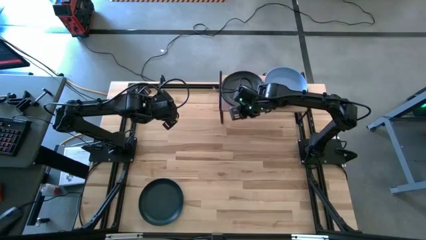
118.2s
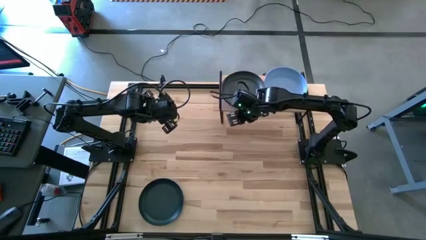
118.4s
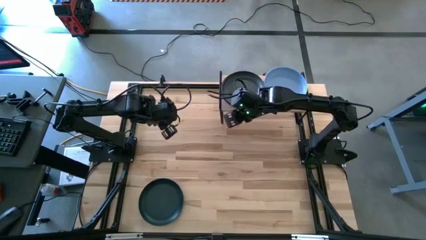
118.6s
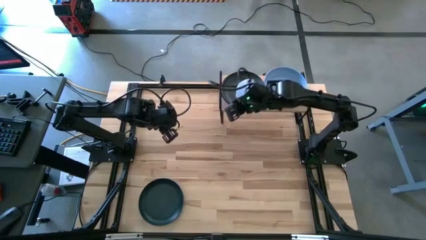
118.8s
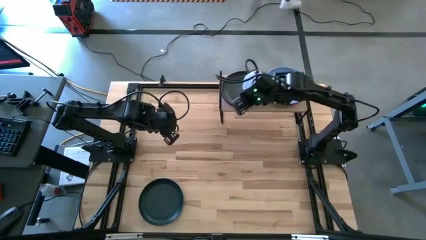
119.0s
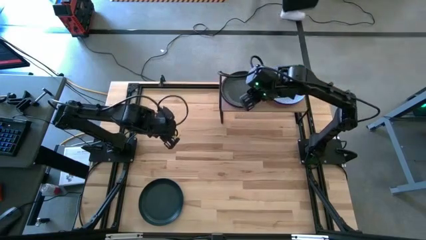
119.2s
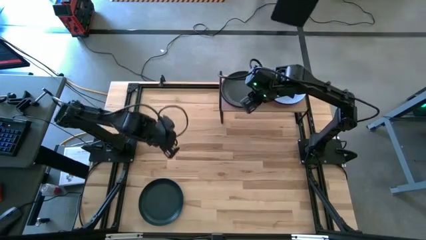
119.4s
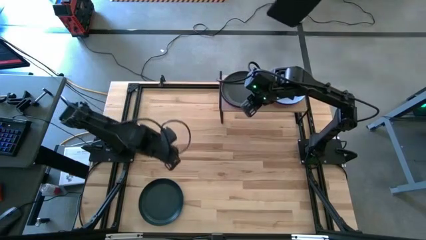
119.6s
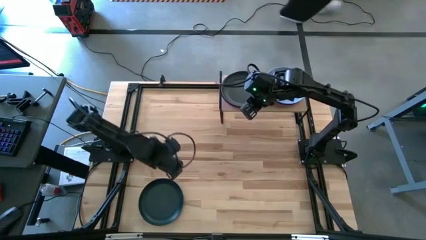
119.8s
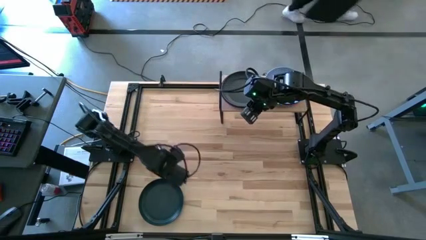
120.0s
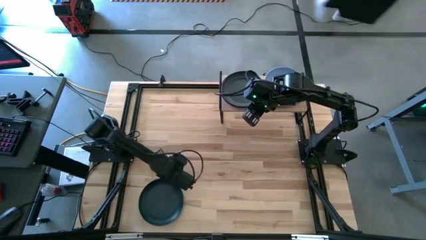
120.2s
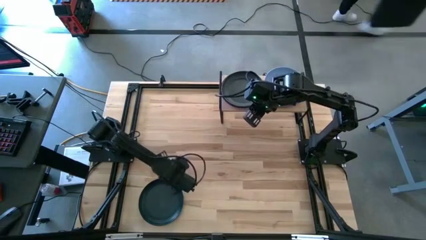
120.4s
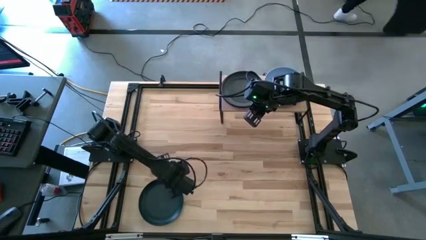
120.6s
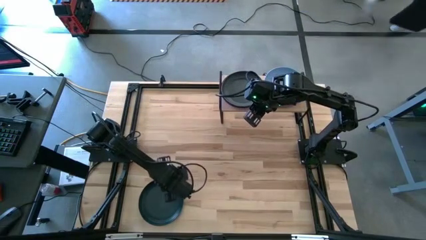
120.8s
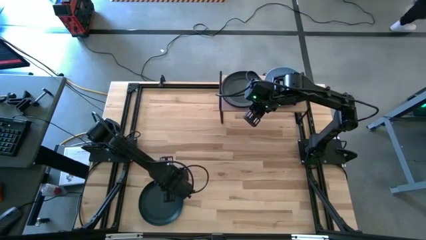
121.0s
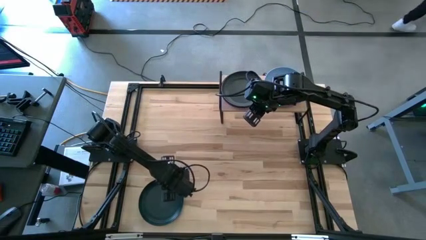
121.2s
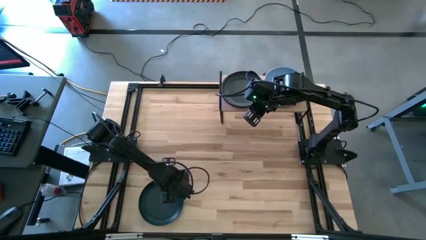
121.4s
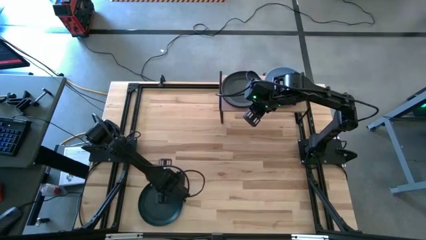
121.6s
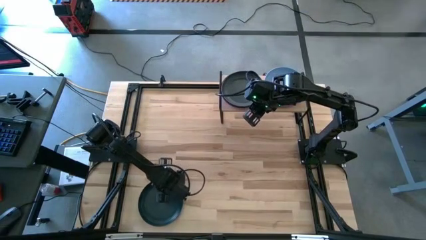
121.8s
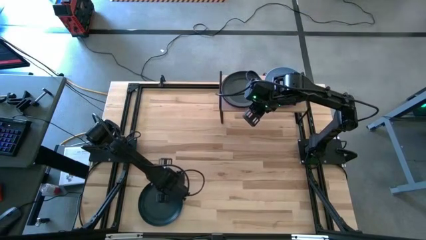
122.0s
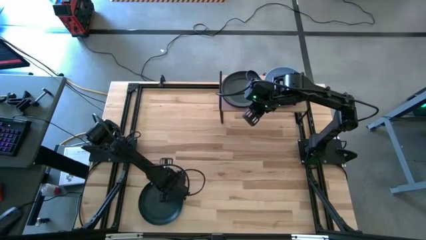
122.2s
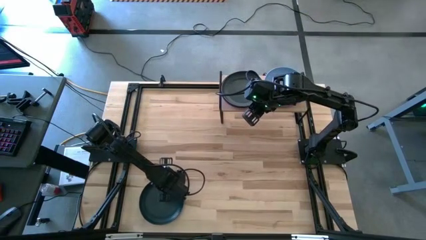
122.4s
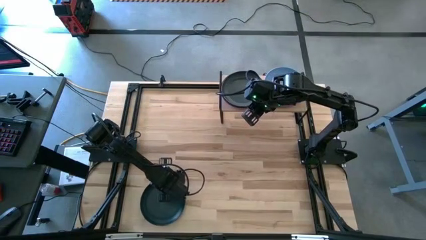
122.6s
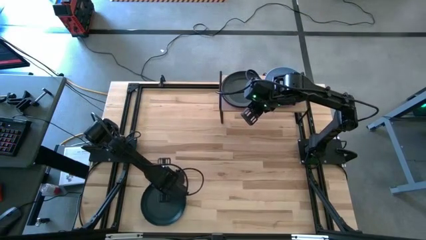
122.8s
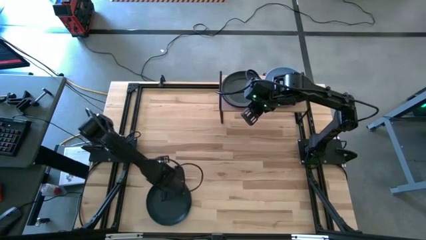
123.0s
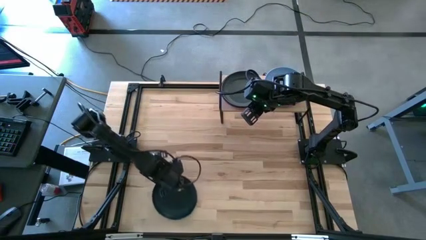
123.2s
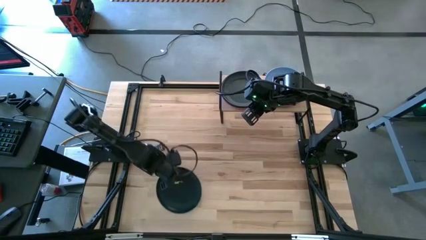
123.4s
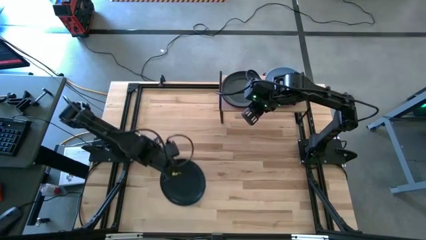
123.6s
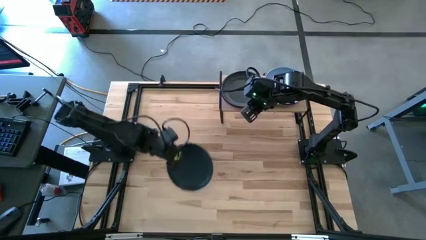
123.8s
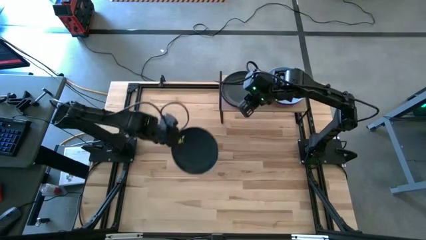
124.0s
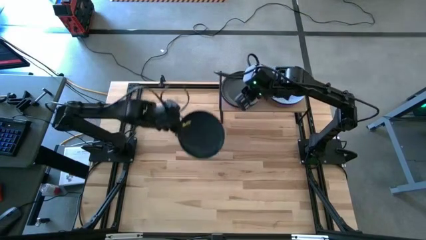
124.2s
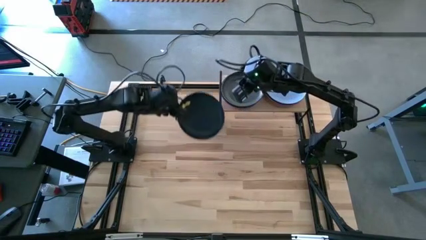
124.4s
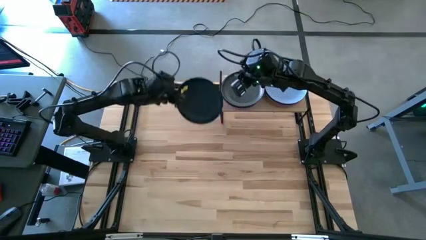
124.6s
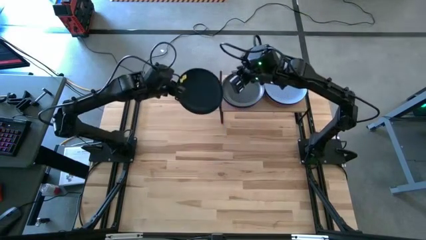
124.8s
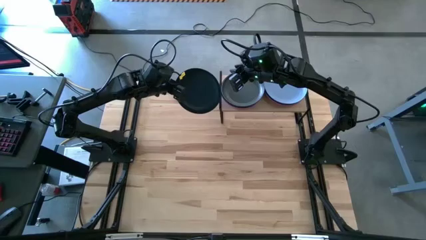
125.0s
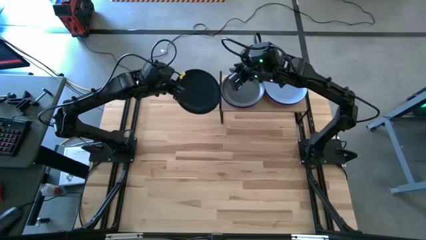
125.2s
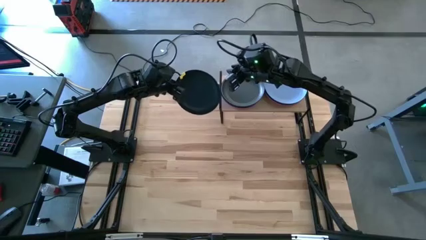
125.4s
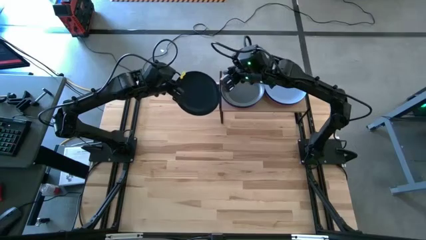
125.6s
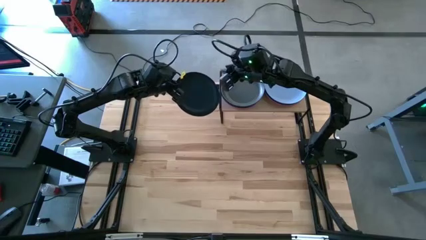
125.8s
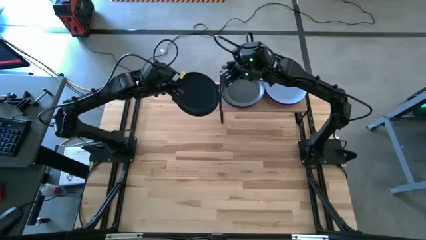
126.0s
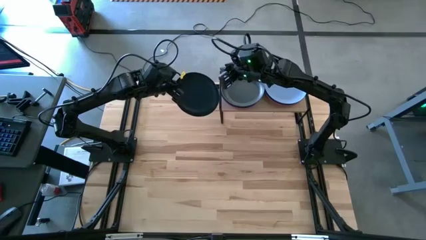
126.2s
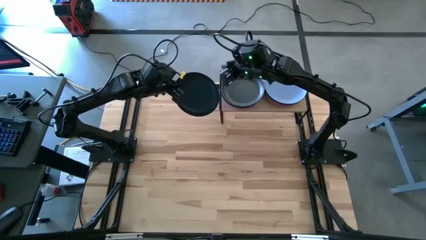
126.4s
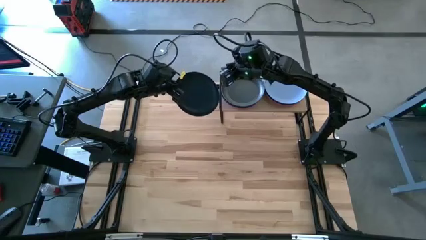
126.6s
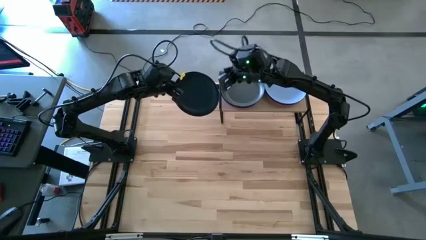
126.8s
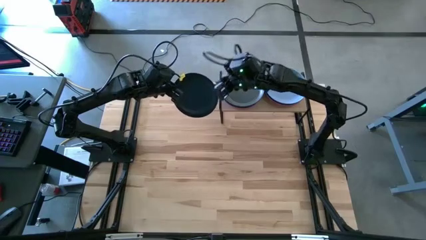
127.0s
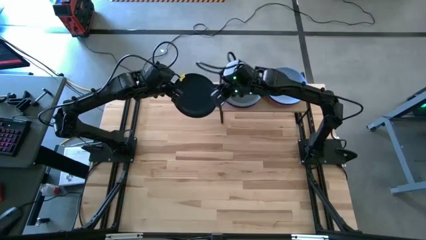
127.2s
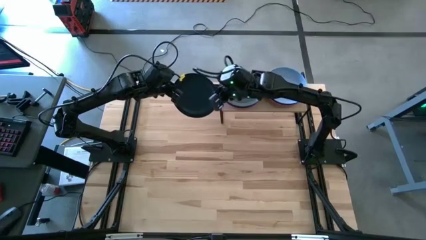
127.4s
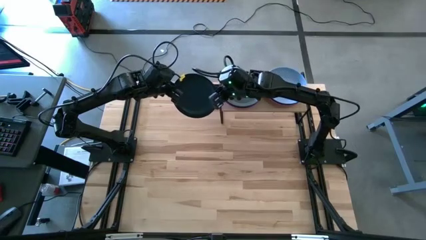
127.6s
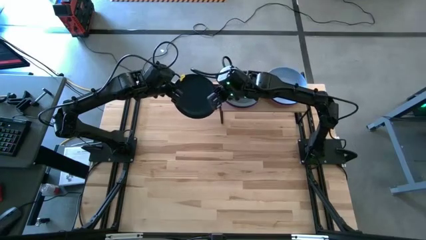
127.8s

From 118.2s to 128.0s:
Task: Place and stack plates onto a shelf
Stack the black plate on top of the other black plate on the shelf

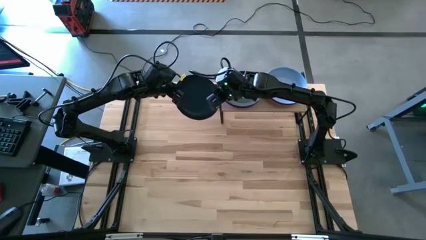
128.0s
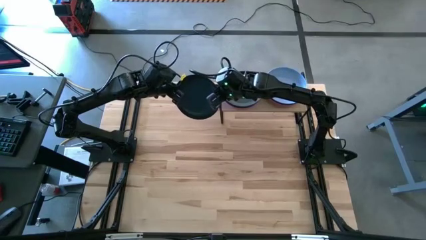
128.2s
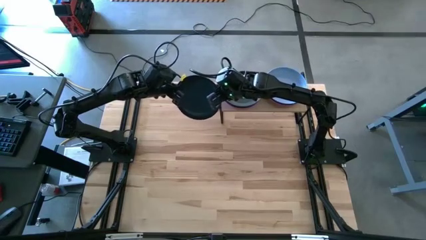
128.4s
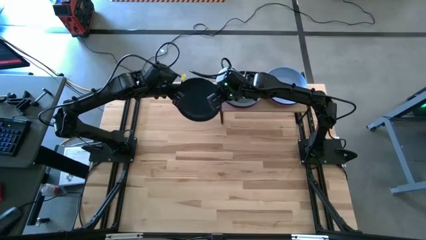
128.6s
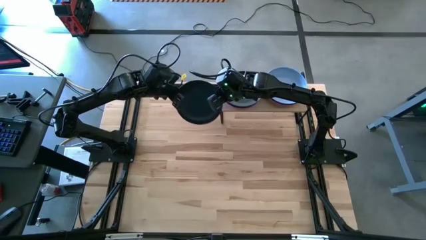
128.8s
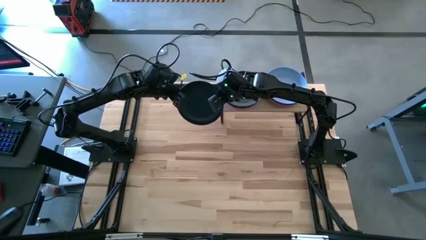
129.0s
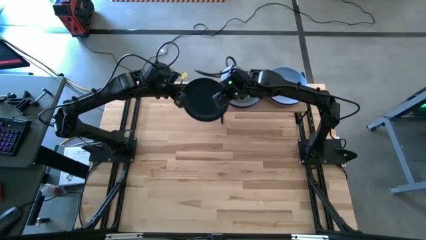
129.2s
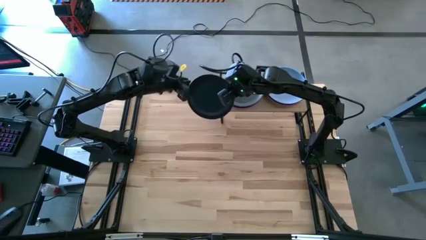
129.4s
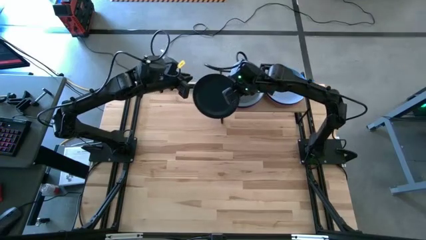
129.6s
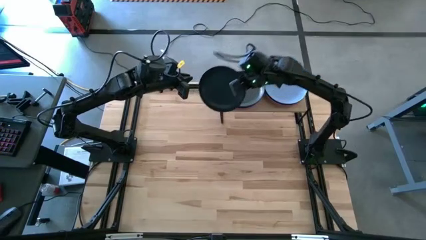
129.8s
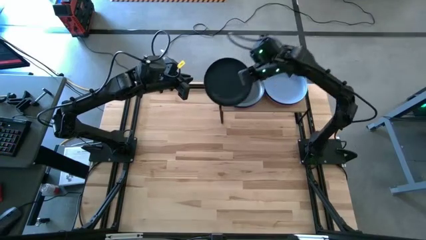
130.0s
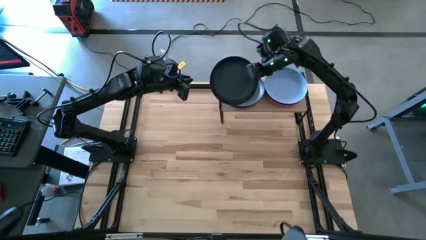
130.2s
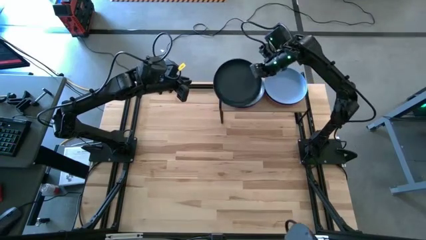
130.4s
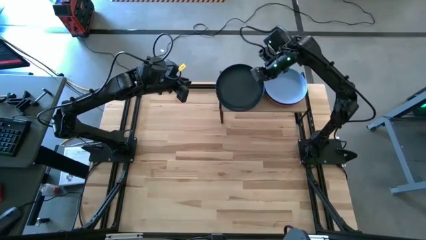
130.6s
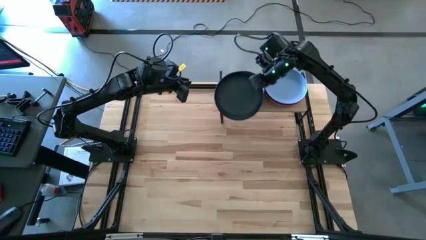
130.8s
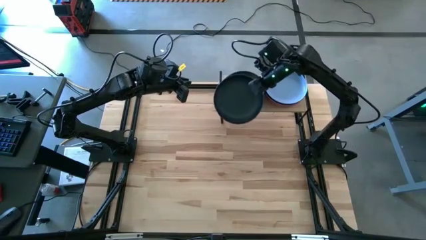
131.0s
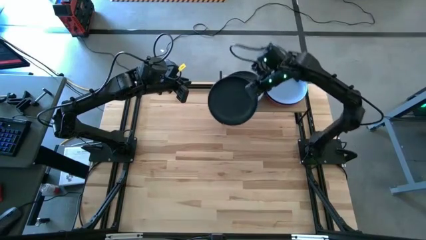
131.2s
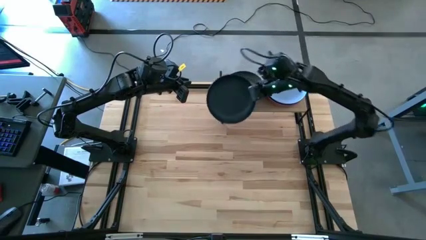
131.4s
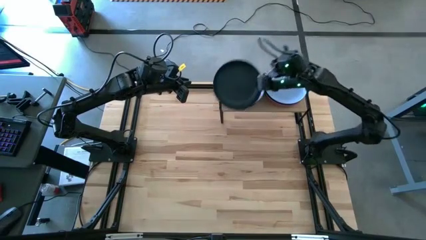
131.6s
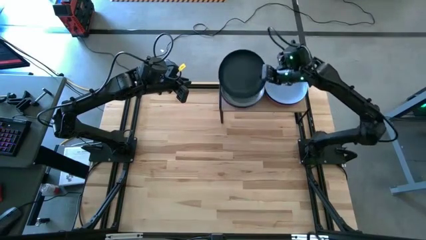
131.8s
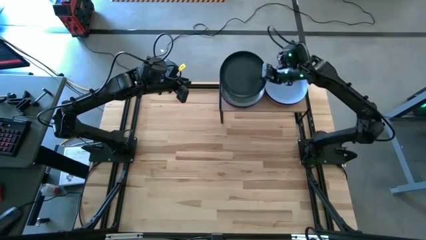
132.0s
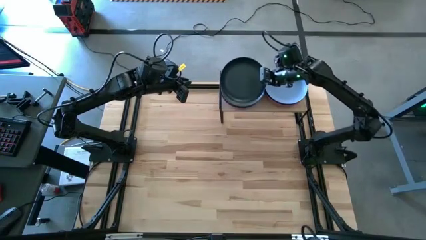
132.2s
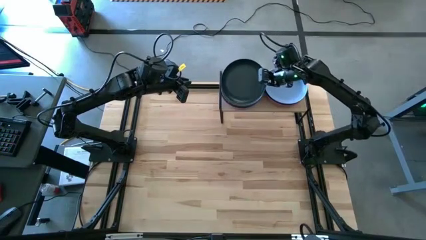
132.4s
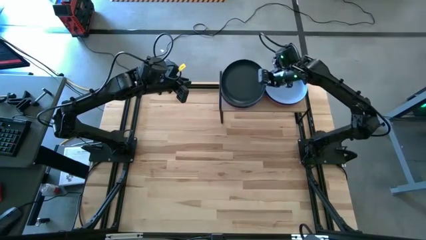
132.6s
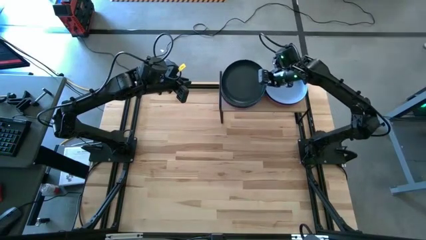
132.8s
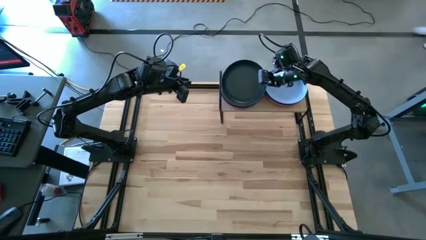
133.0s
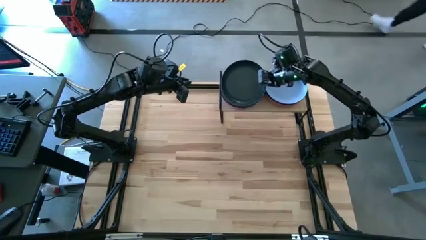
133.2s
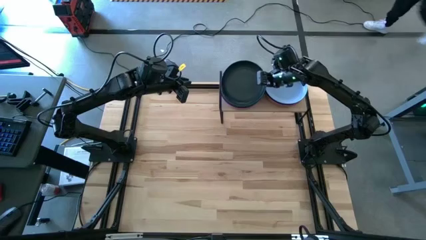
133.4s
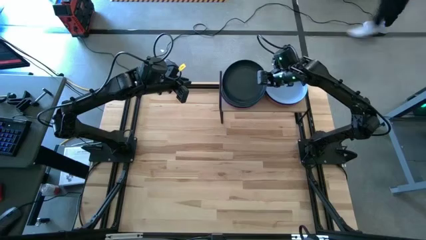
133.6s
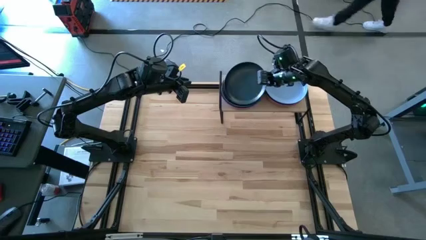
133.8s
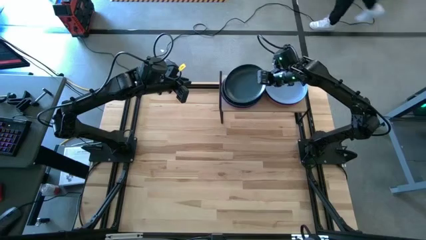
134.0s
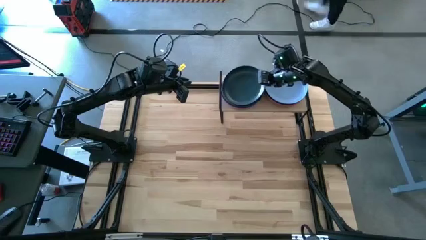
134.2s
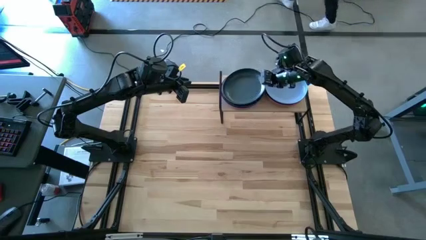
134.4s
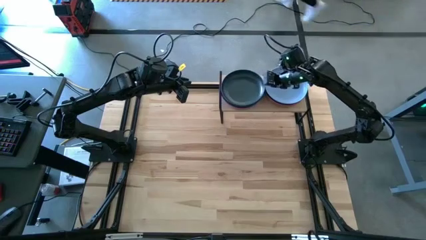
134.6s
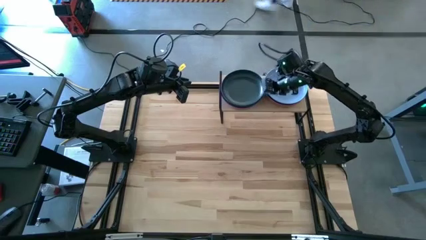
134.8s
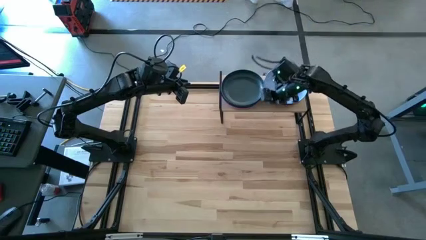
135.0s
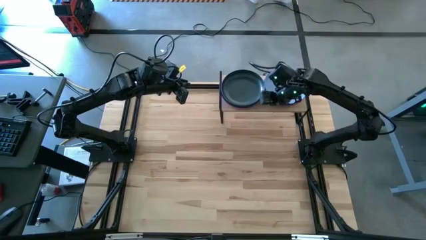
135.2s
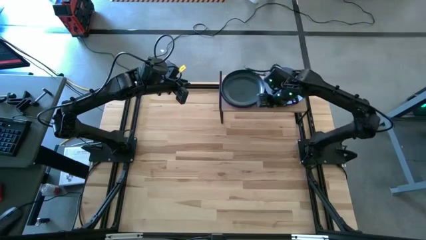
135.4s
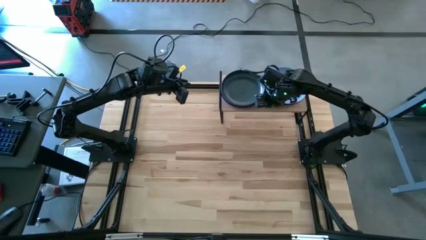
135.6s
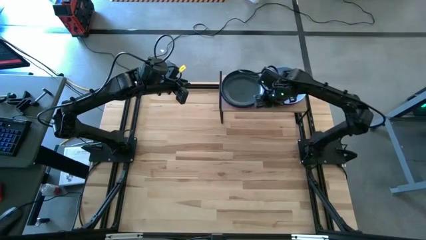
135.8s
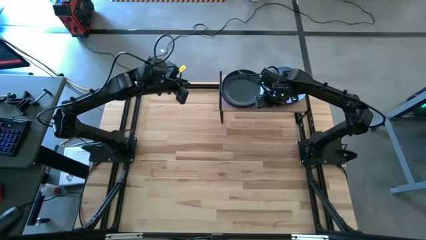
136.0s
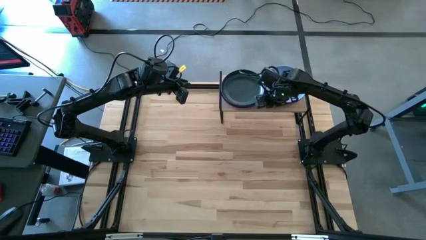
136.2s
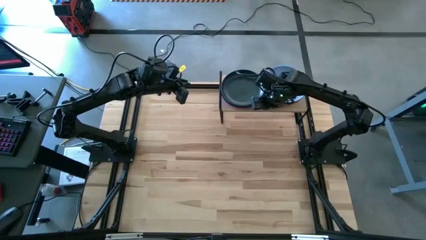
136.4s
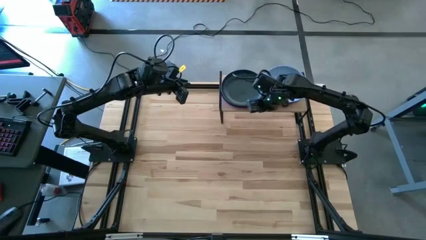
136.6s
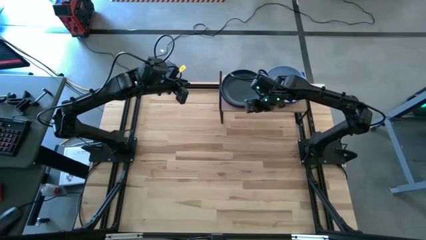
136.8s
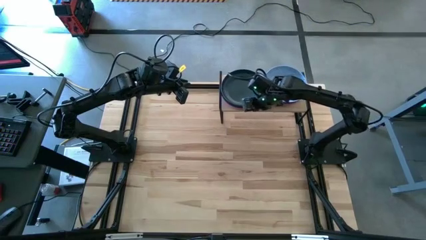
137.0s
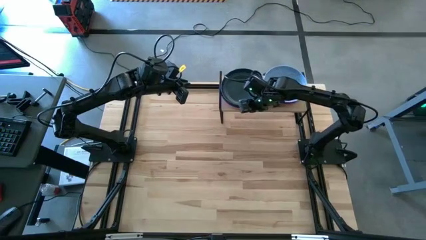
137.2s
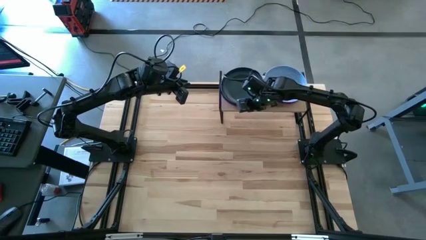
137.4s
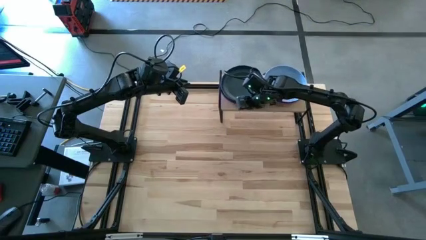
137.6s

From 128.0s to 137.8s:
Stack the black plate on top of the other black plate on the shelf
